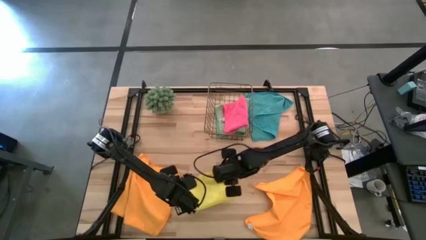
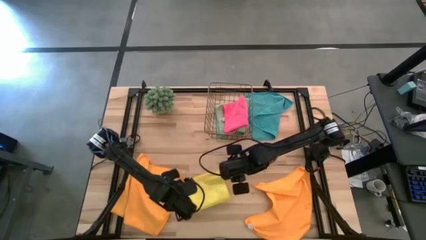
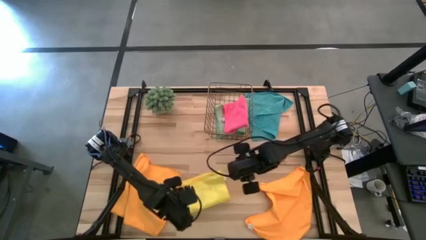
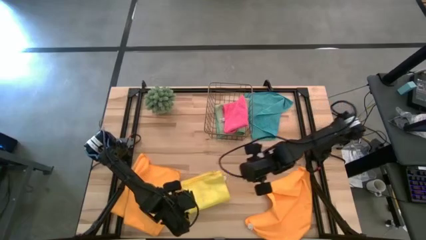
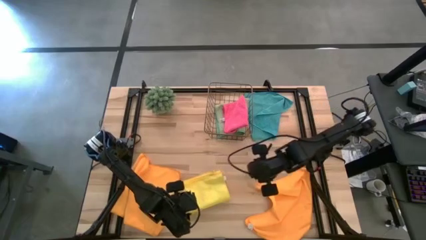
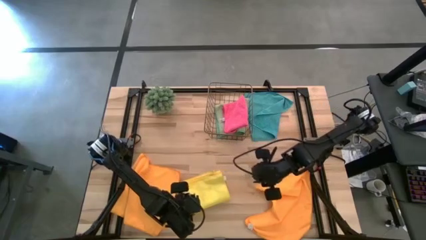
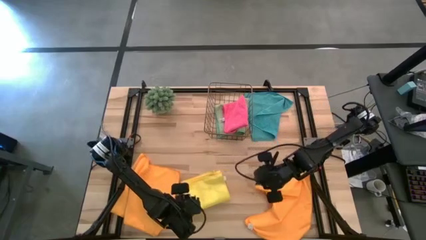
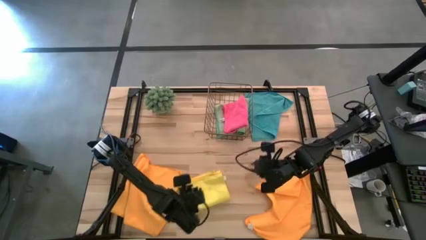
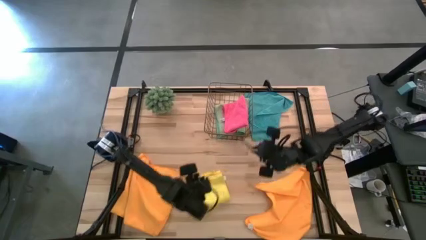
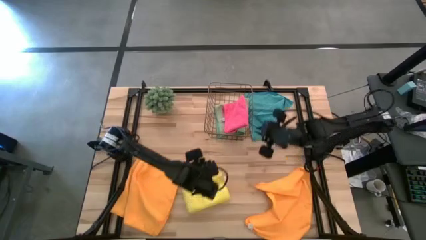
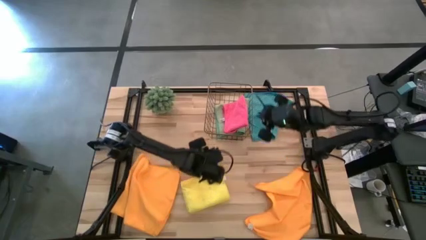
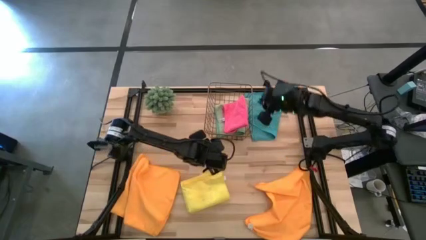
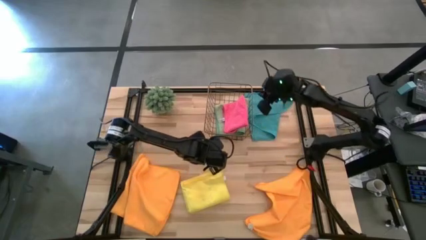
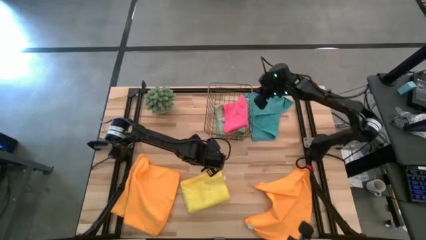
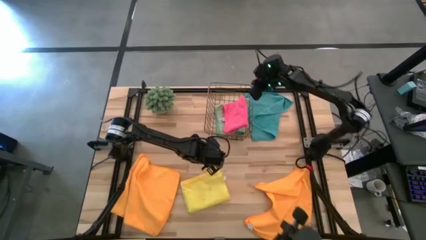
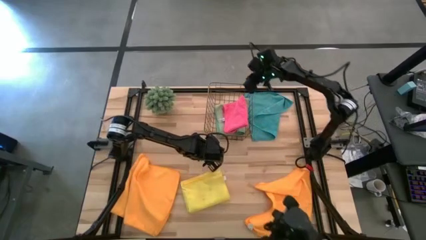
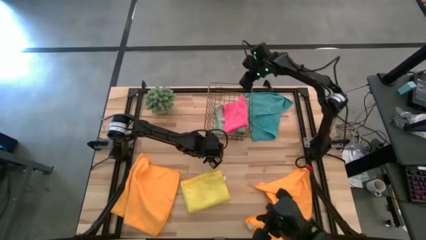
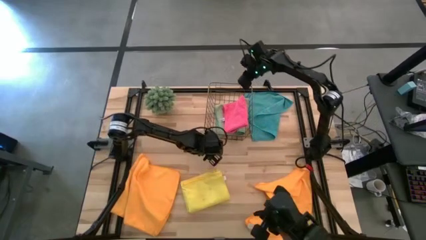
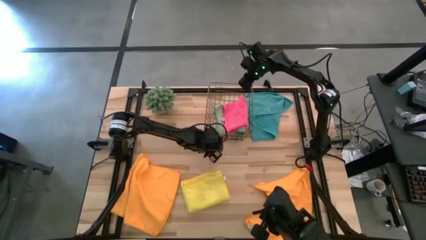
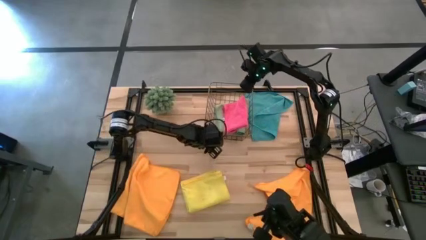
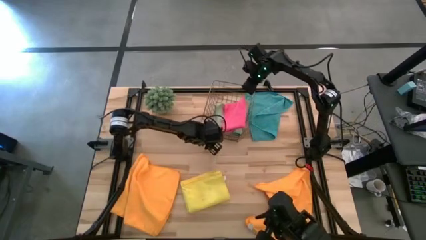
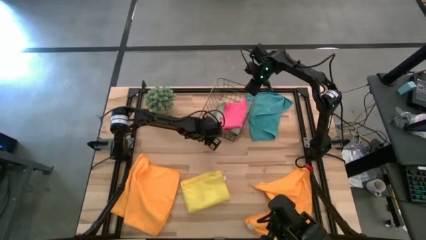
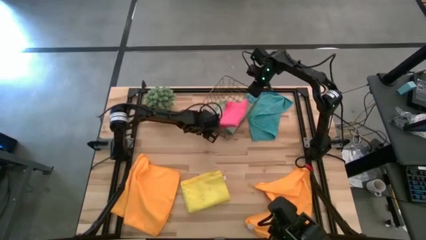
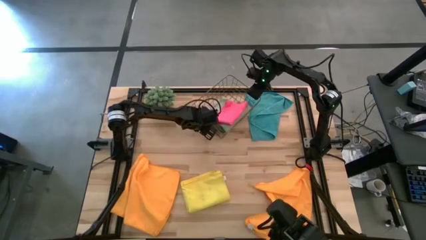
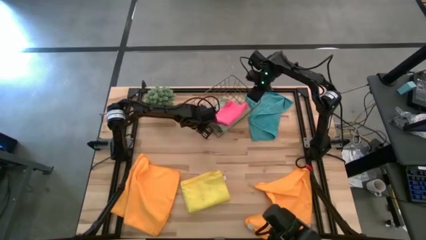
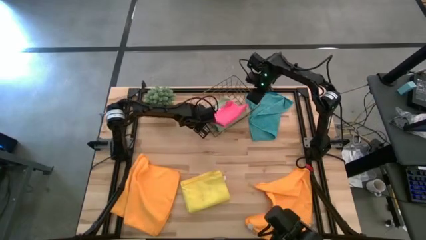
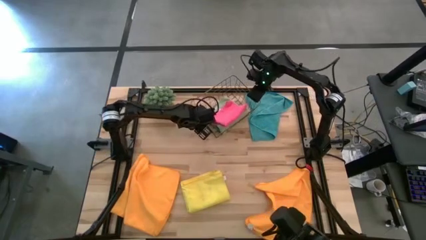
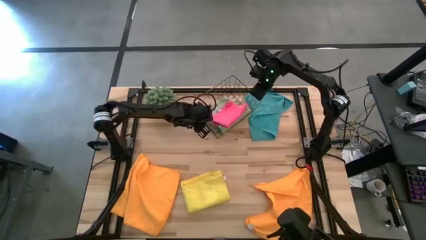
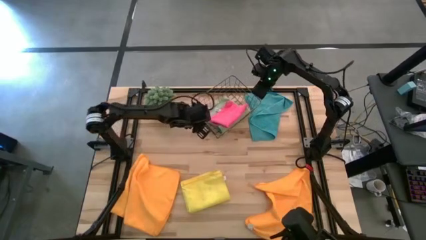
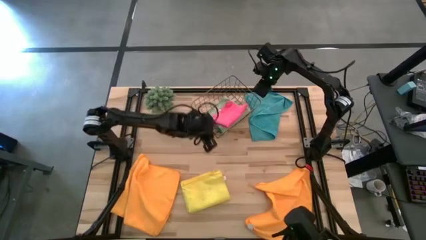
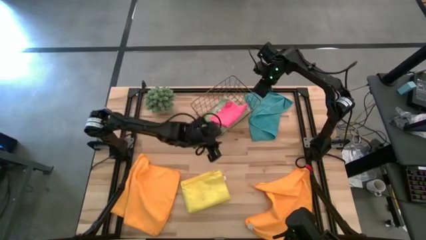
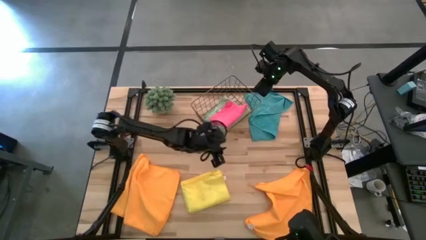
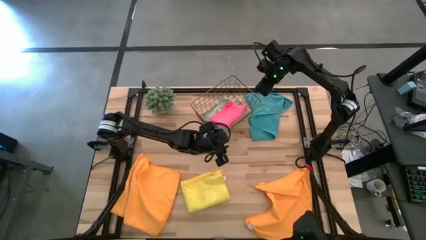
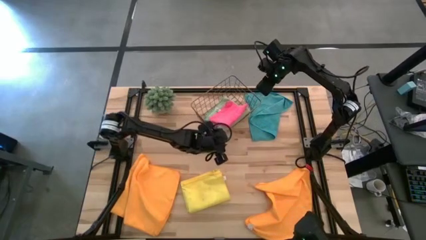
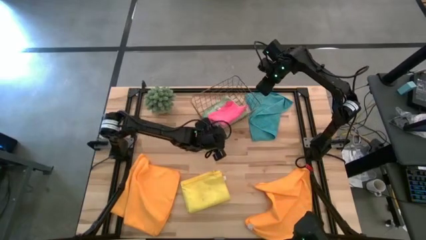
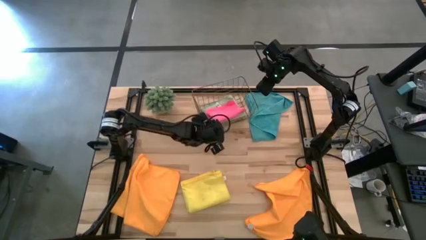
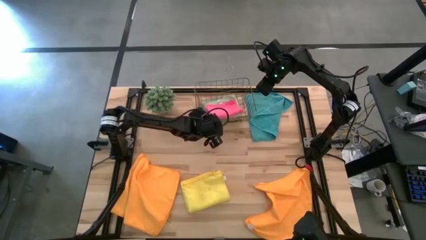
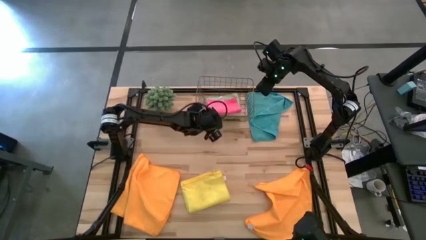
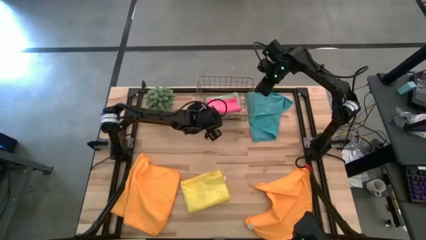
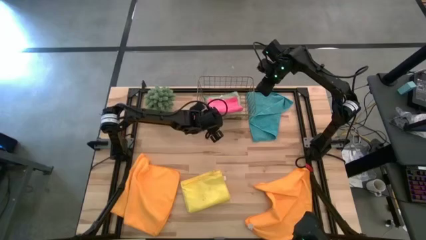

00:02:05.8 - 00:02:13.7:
Task: Fold microfiber towels
Adjust the wire basket

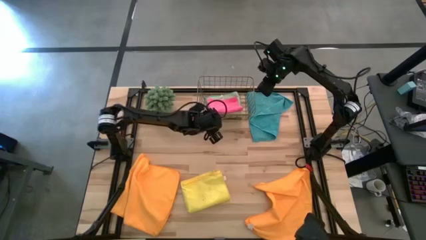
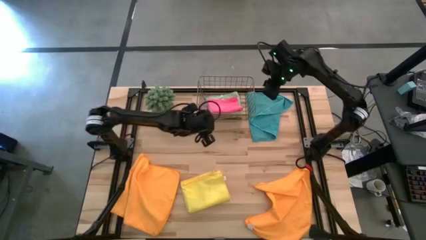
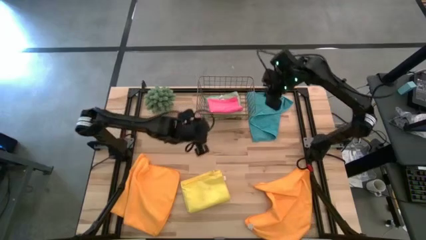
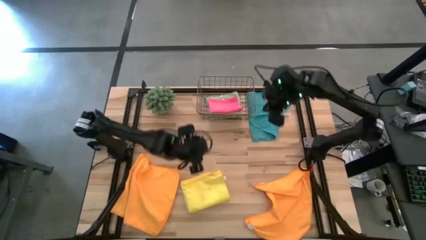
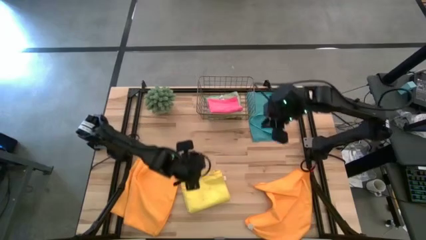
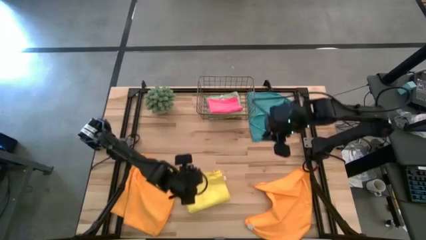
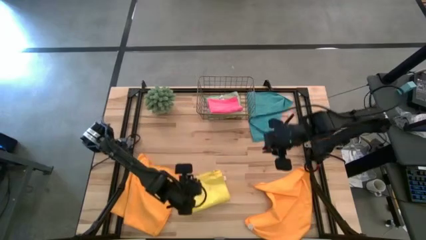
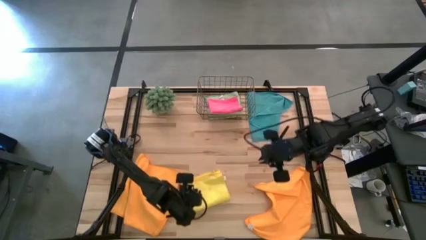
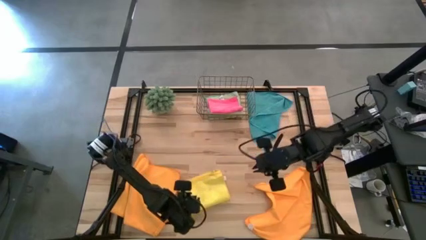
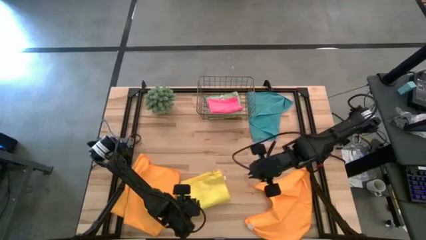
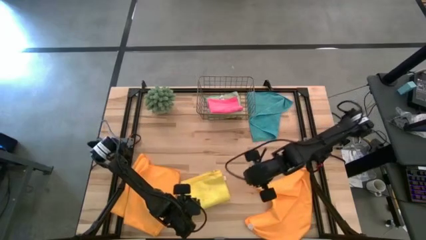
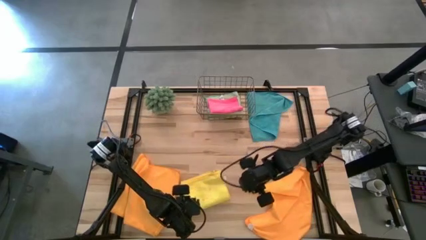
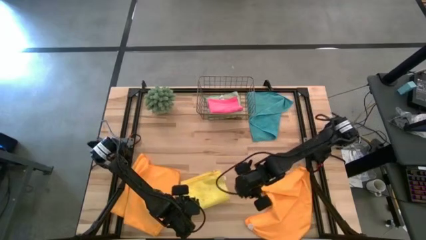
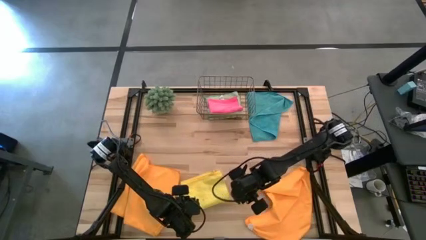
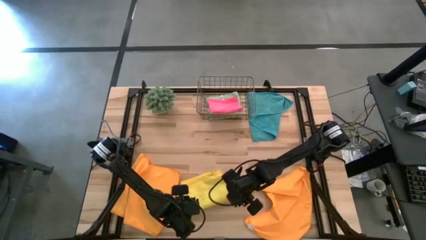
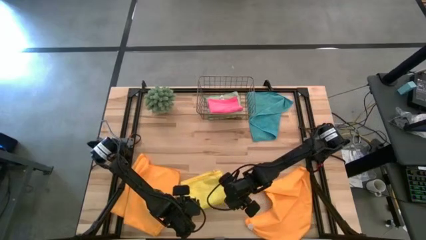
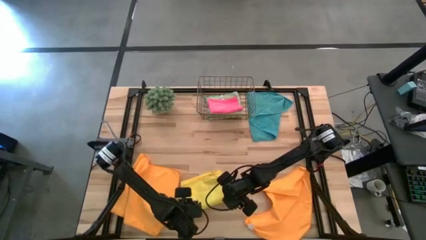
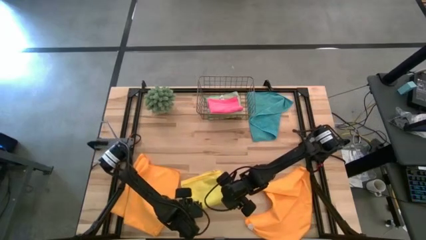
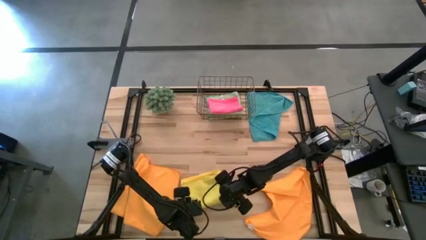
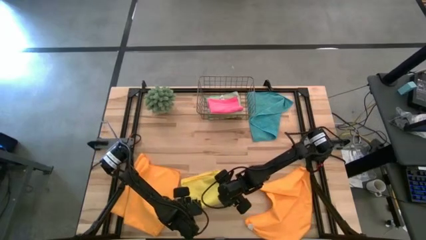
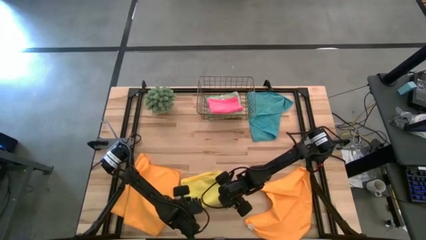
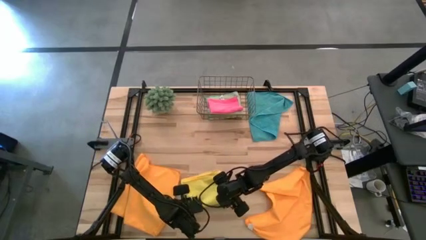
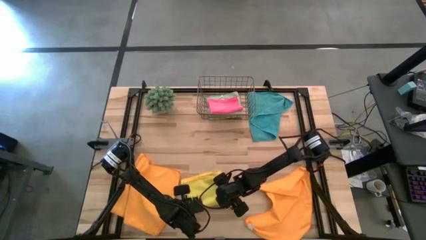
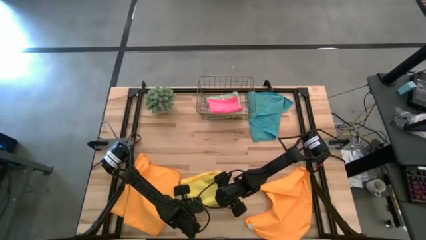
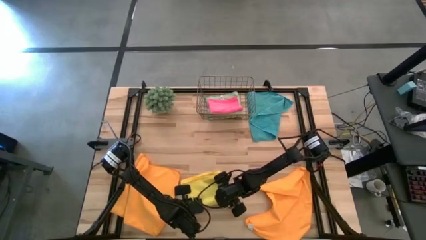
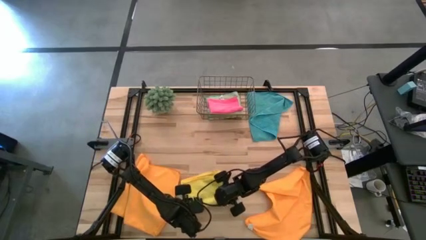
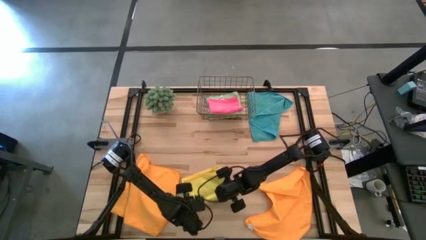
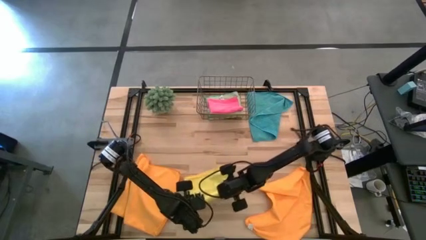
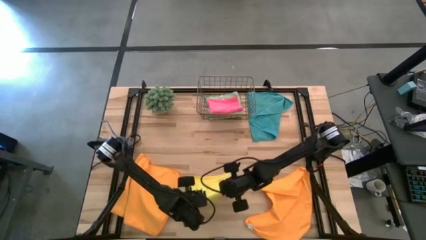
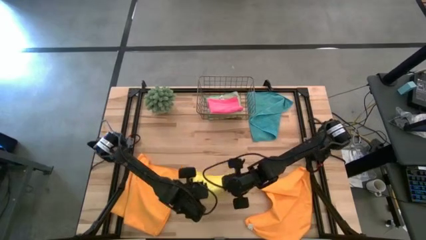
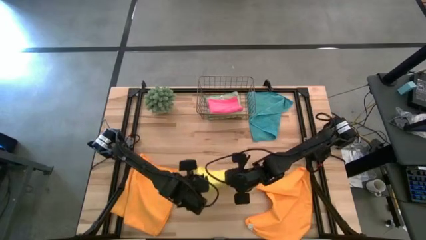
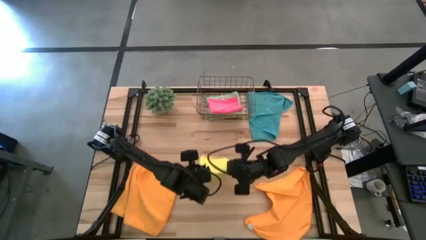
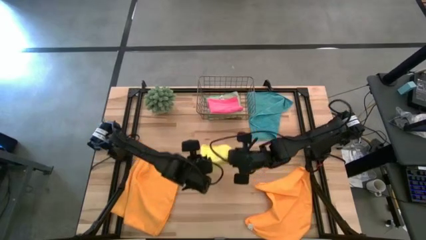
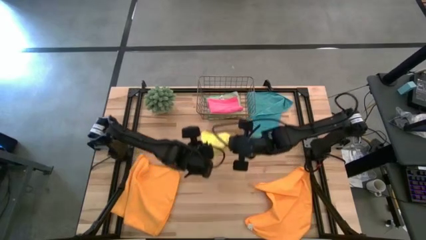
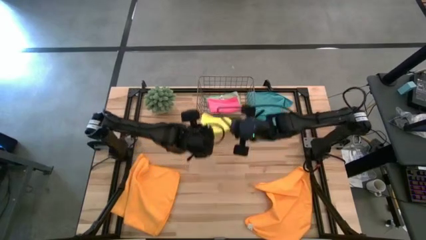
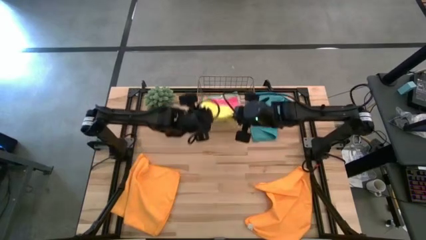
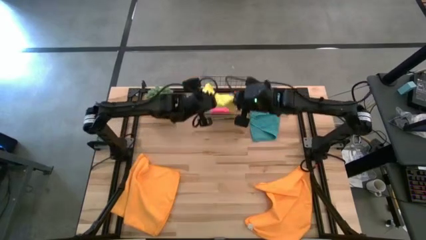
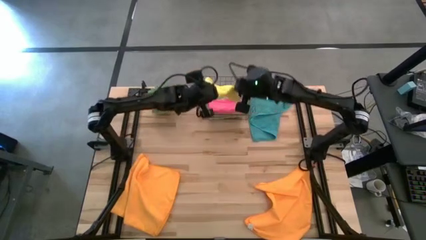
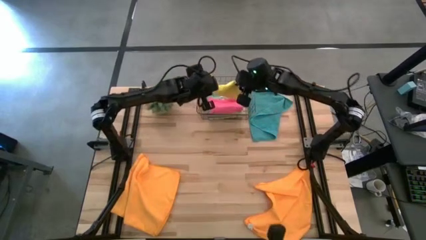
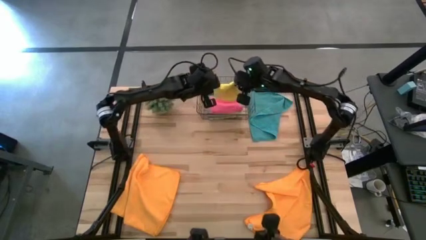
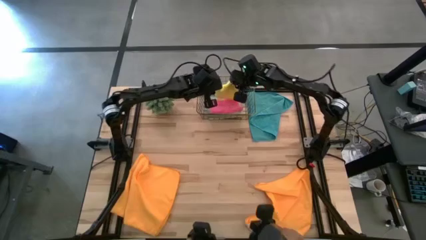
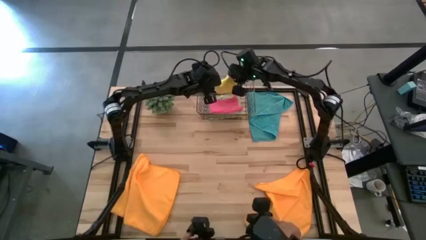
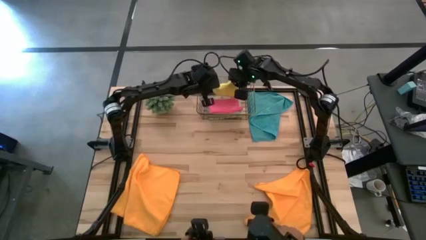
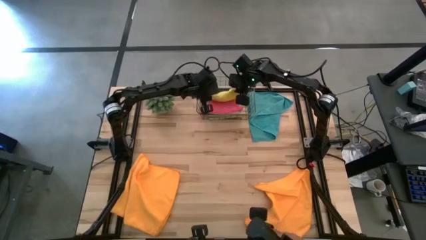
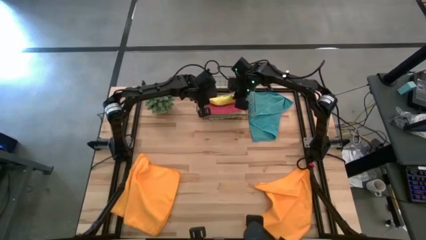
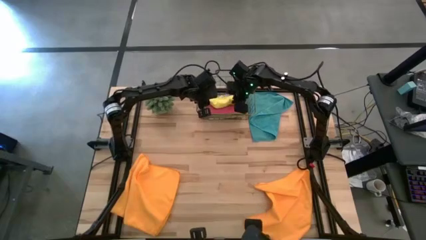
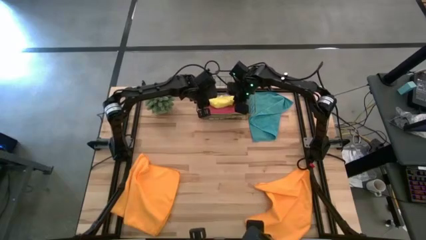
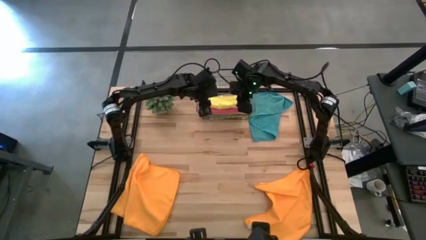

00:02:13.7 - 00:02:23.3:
Put the yellow folded towel into the wire basket
